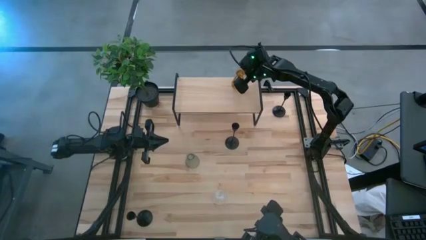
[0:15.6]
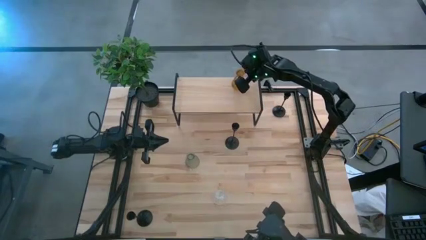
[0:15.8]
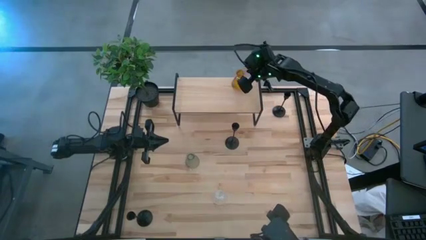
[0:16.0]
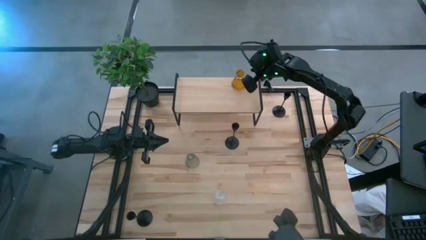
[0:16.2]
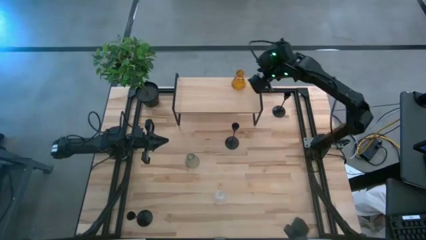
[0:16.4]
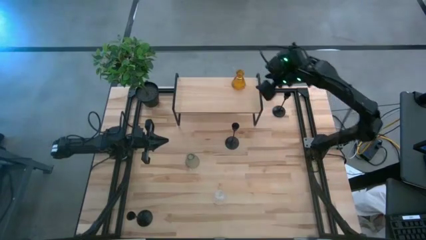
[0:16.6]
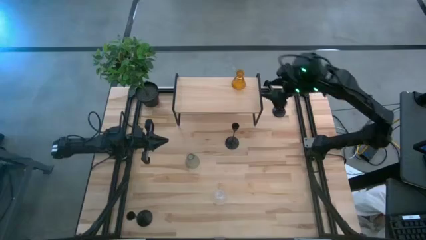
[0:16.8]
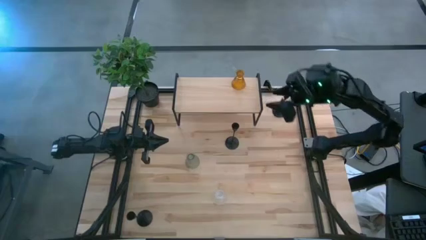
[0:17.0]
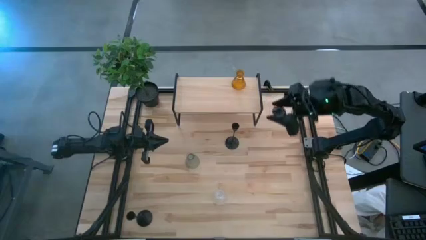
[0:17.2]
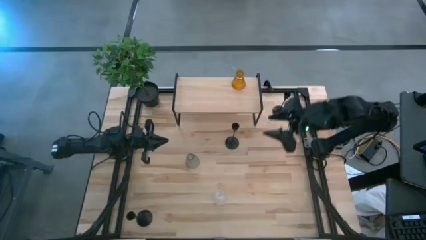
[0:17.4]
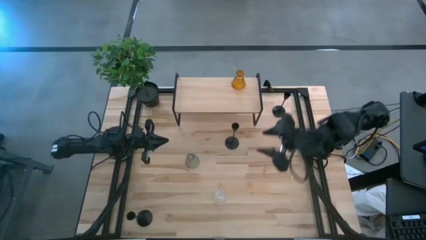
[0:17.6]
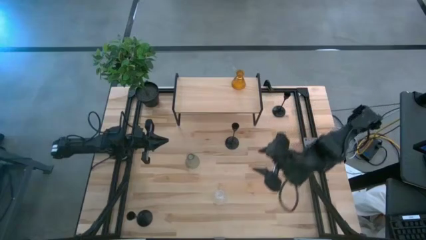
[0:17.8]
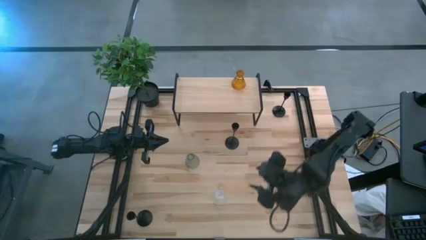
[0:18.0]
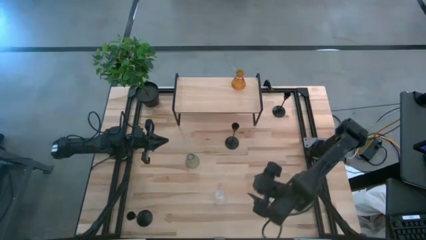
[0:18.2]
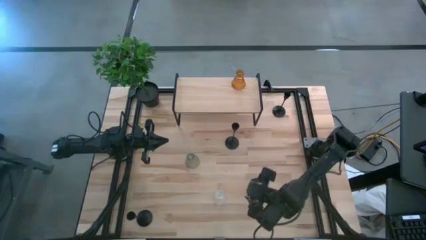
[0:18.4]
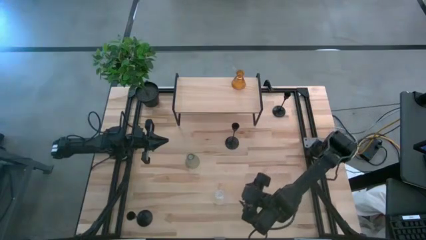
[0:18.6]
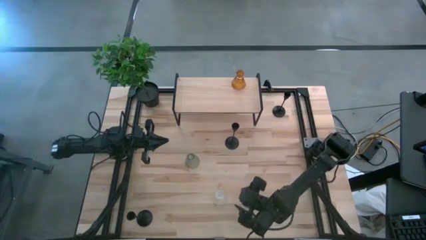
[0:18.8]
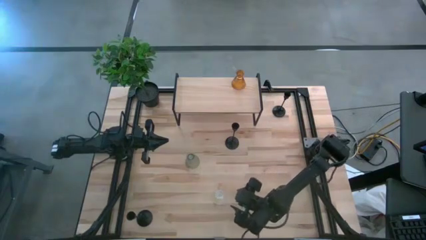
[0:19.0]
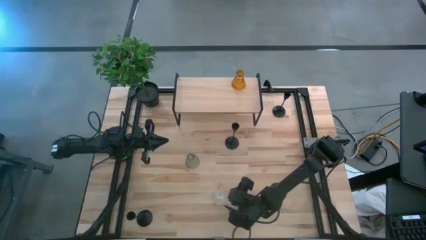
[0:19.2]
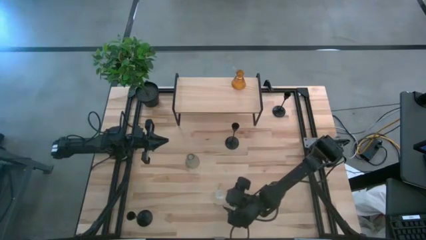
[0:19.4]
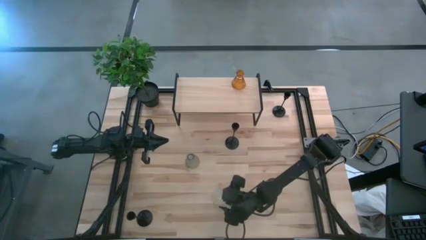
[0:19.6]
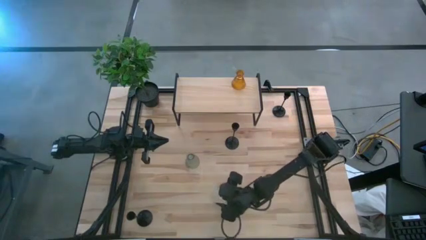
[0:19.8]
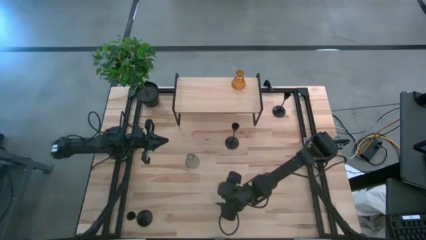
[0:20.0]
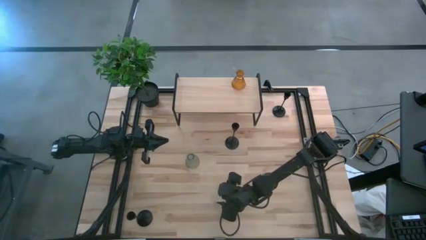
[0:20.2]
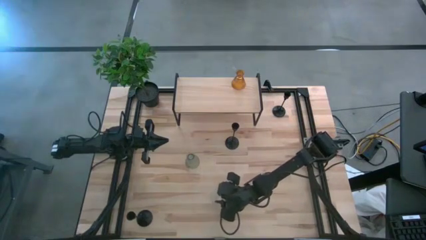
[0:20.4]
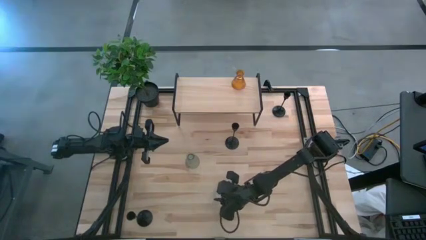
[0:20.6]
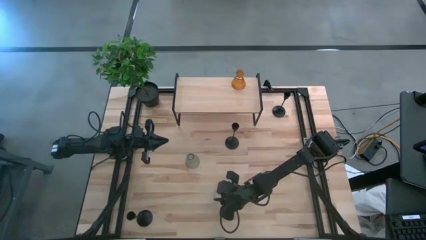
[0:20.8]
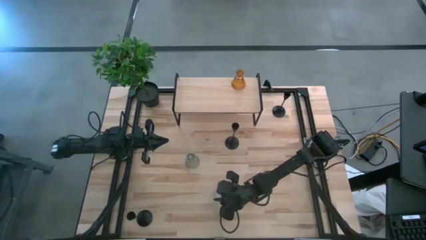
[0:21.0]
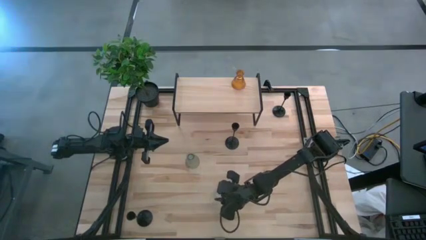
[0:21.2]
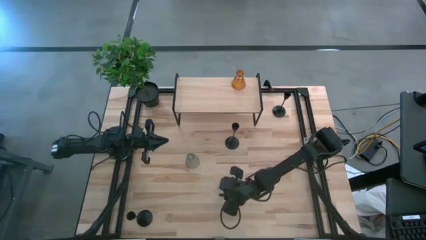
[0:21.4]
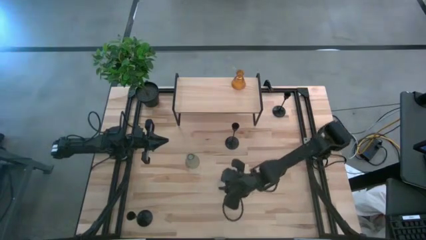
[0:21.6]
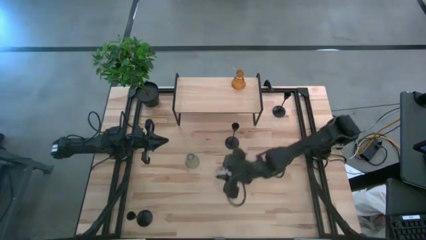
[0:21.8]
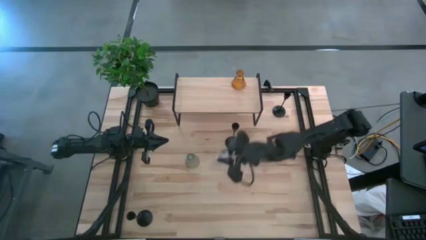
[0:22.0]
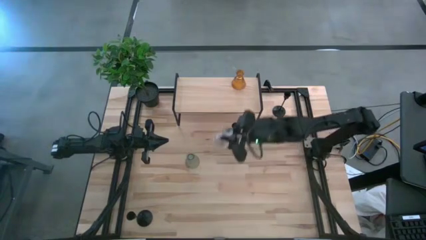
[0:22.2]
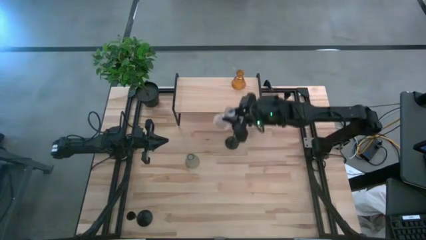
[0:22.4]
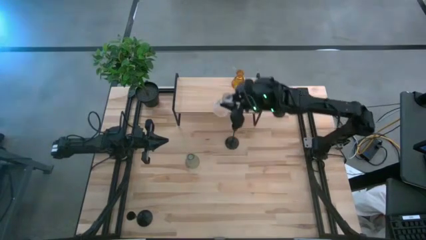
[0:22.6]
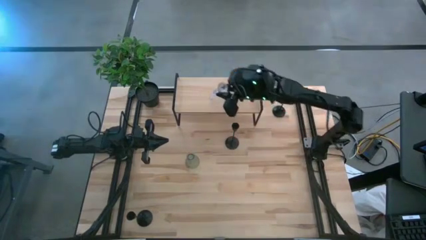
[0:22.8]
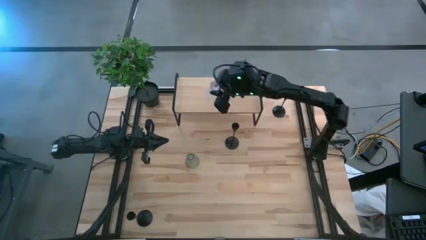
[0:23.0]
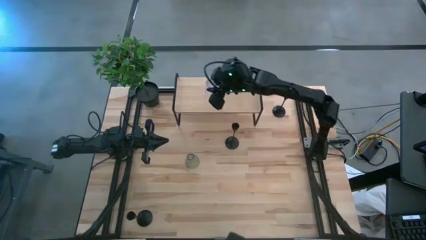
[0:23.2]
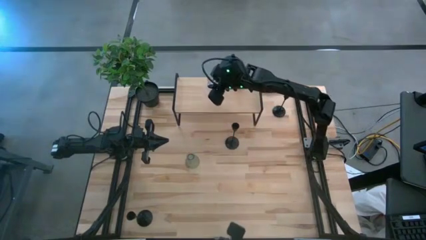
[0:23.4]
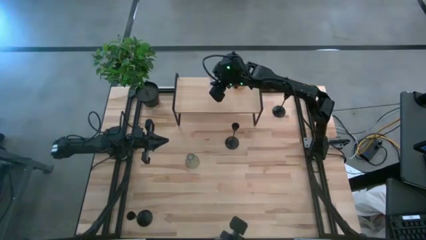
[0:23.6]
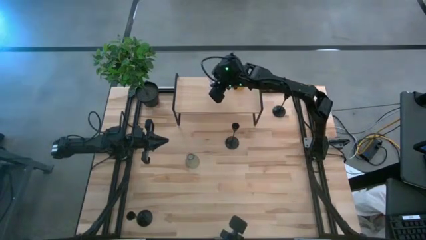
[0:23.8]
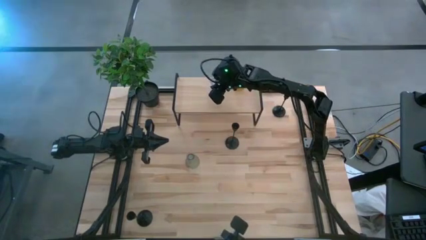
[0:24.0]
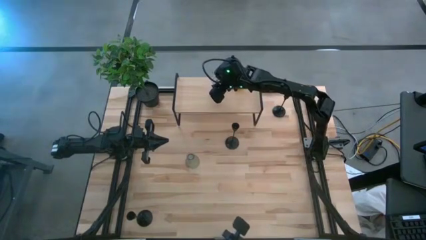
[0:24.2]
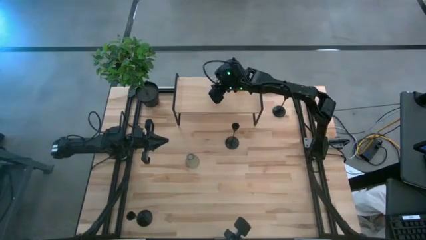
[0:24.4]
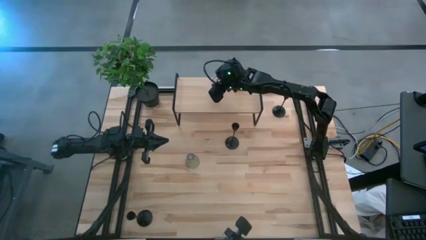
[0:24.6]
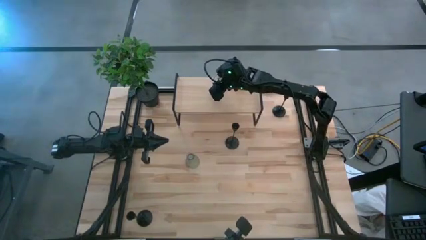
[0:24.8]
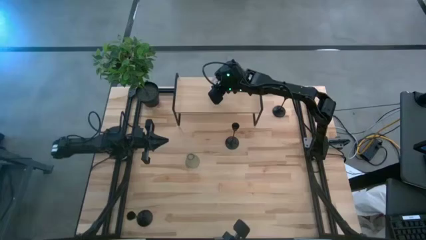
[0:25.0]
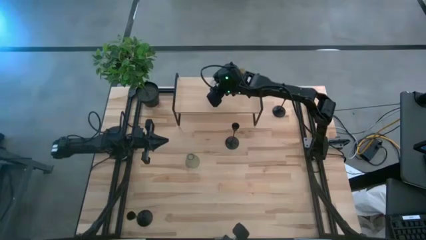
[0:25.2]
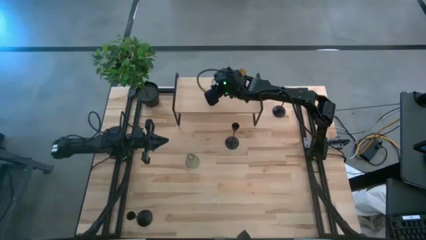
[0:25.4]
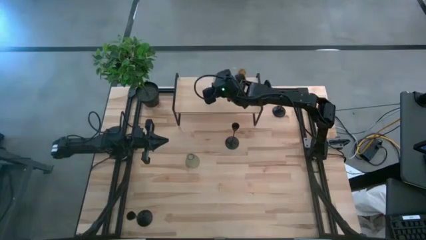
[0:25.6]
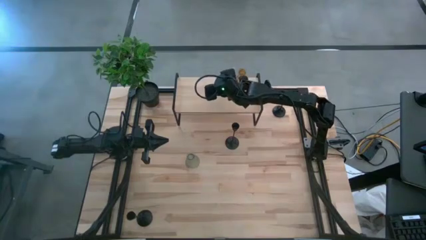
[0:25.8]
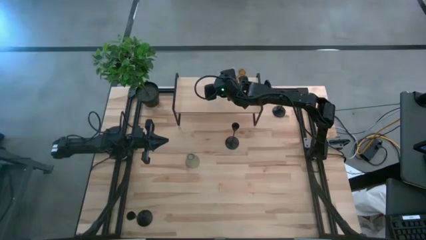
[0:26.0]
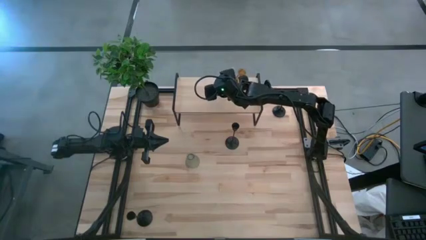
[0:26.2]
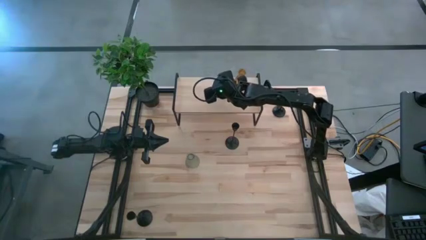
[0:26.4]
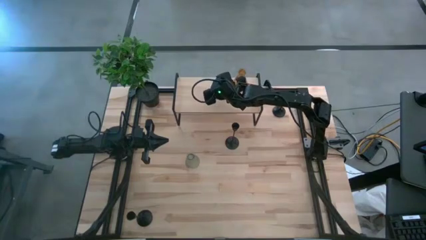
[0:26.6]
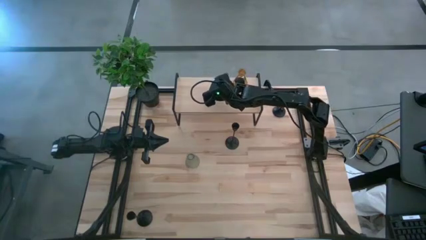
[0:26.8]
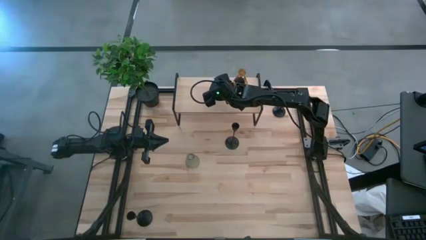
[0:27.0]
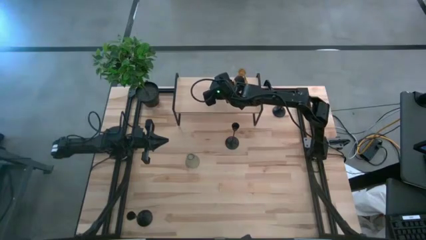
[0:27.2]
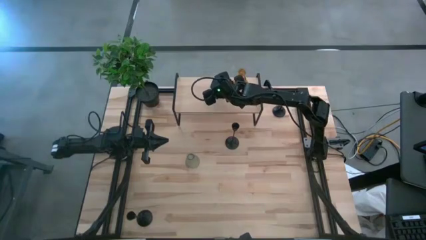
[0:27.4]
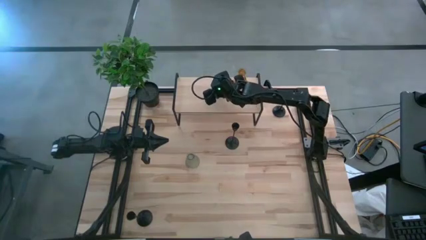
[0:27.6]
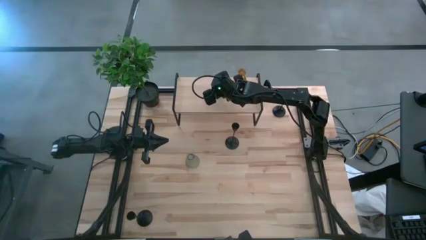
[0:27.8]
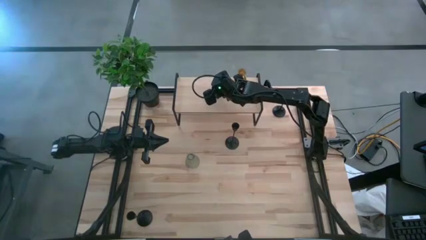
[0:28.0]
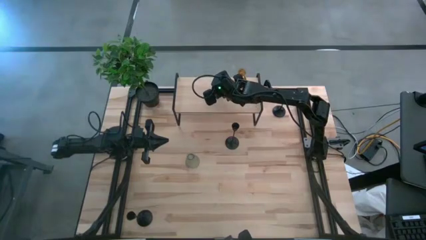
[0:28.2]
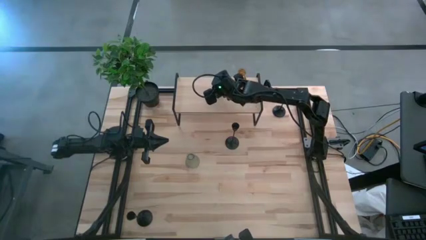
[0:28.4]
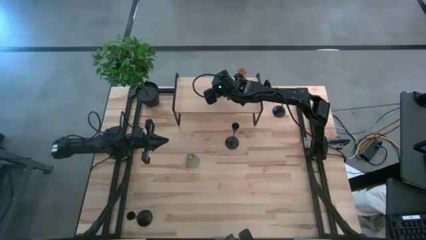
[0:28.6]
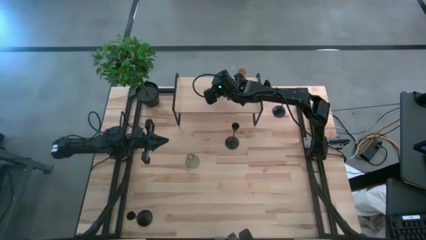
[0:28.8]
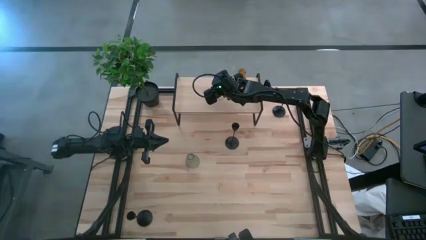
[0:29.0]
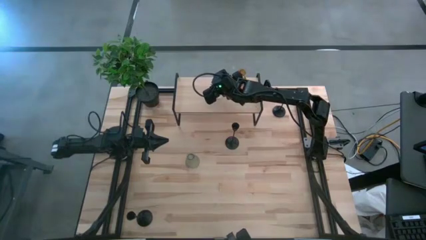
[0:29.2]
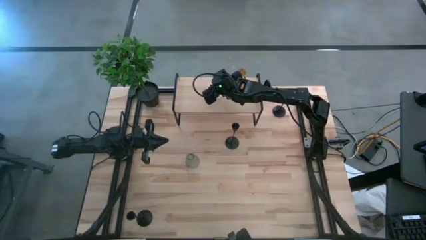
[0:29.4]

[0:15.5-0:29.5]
Task: Pick & Place candle stick holders
Put the transparent candle holder on the shelf

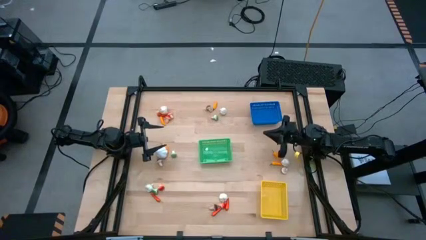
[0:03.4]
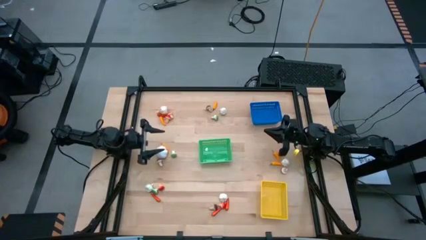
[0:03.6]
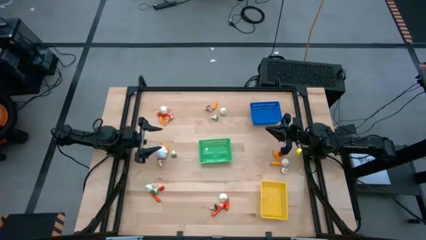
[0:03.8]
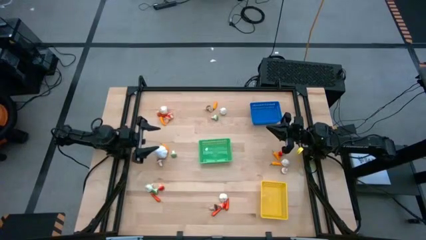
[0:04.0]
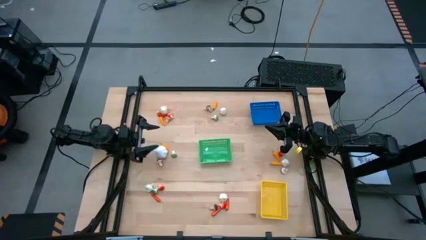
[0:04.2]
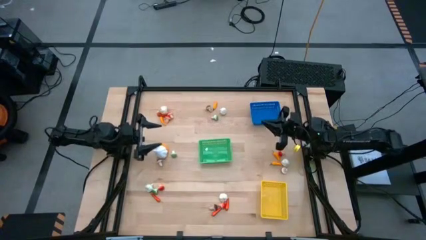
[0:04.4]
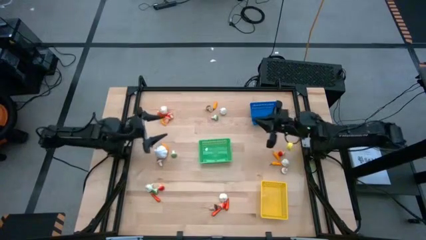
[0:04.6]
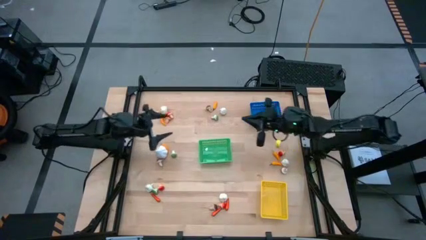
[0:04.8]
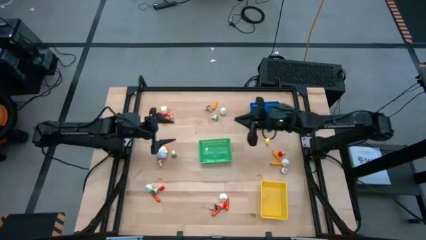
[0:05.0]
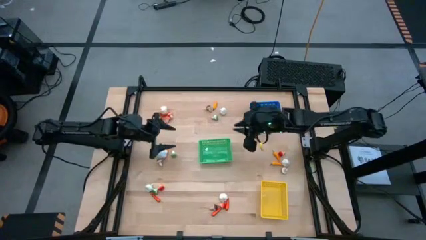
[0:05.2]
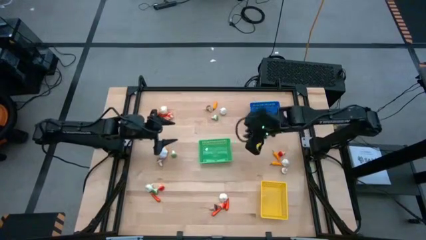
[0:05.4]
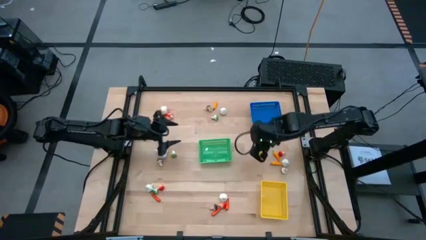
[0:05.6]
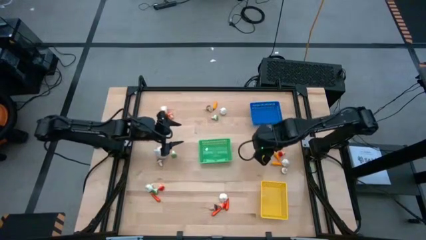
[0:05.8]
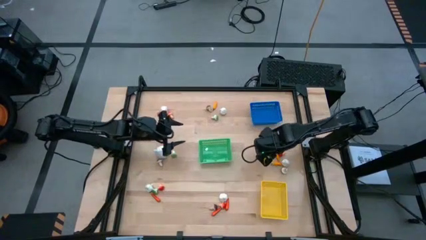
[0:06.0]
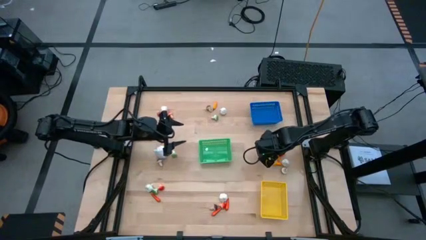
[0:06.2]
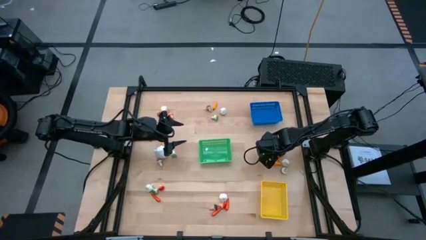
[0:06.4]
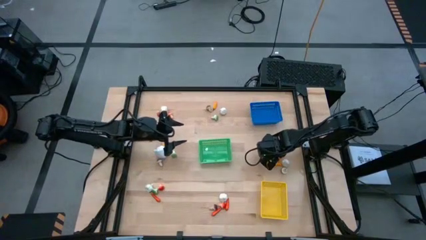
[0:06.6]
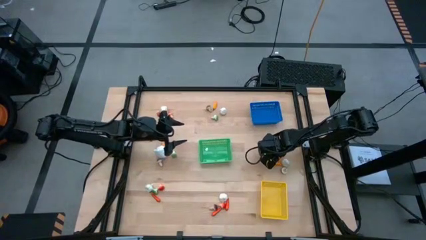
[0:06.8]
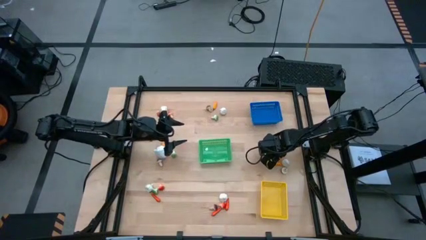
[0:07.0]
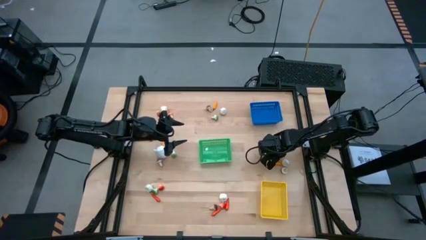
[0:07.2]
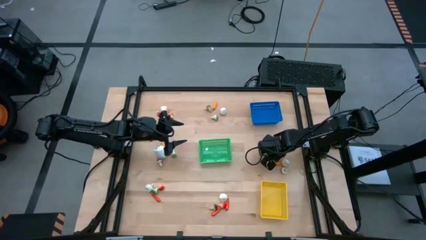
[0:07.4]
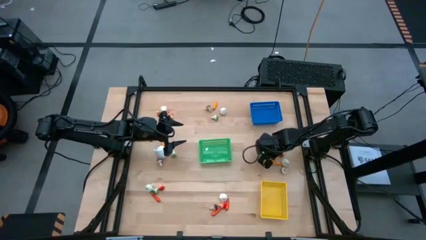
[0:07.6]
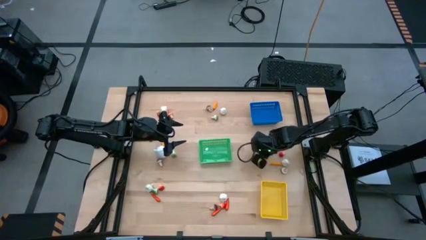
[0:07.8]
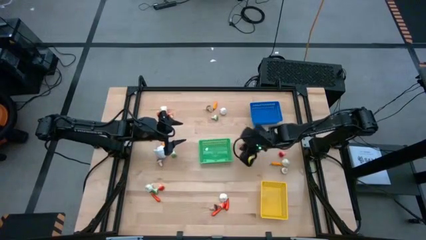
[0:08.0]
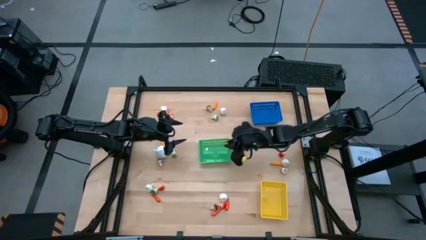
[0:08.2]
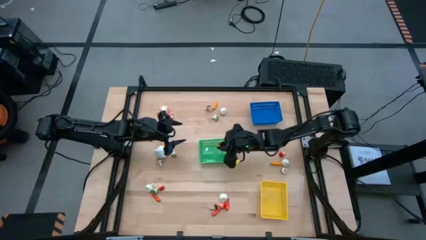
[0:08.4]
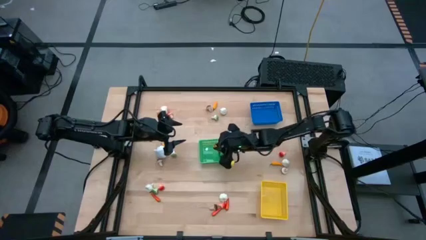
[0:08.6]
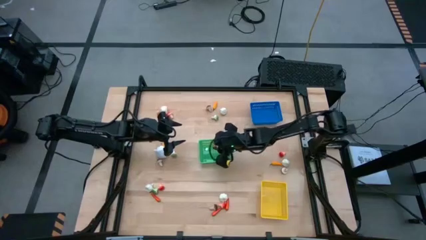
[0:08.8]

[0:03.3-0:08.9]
Task: Sort produce into baskets
Put the yellow chili pepper into the green bin
